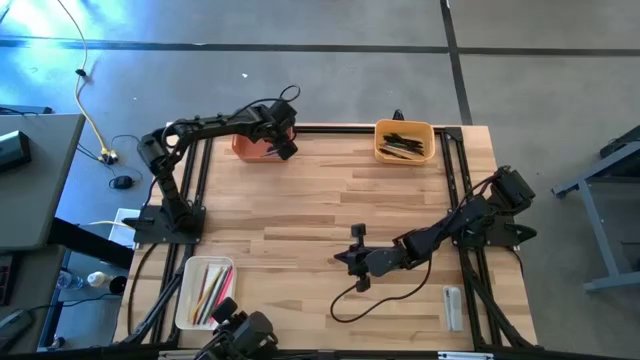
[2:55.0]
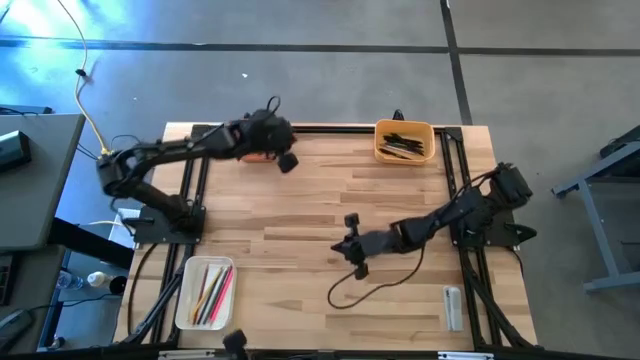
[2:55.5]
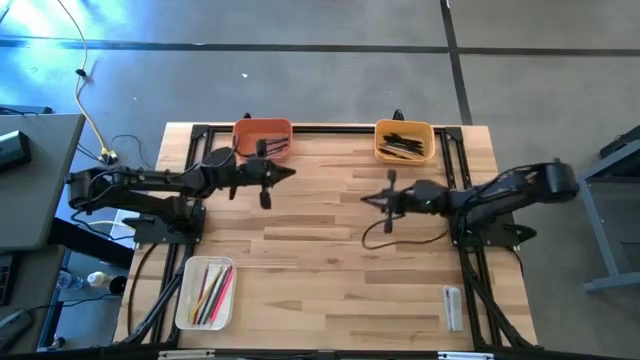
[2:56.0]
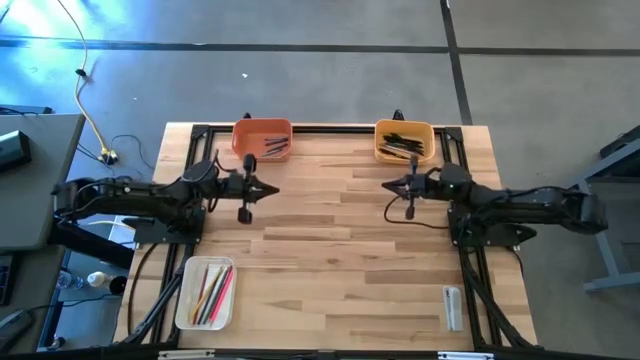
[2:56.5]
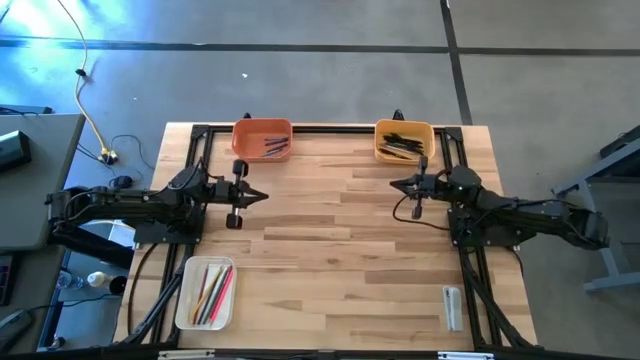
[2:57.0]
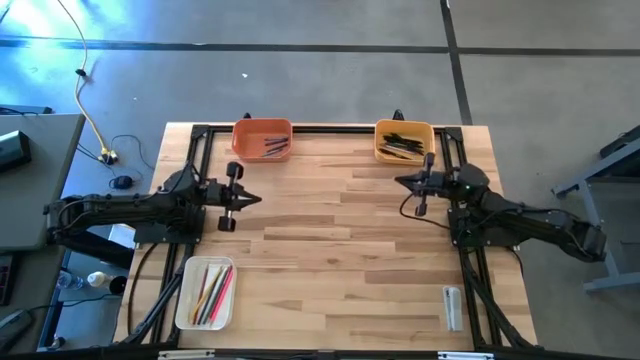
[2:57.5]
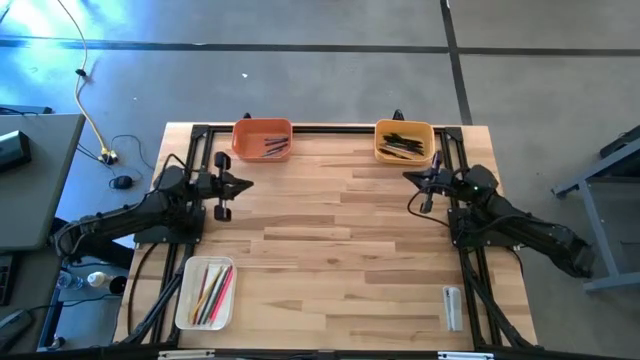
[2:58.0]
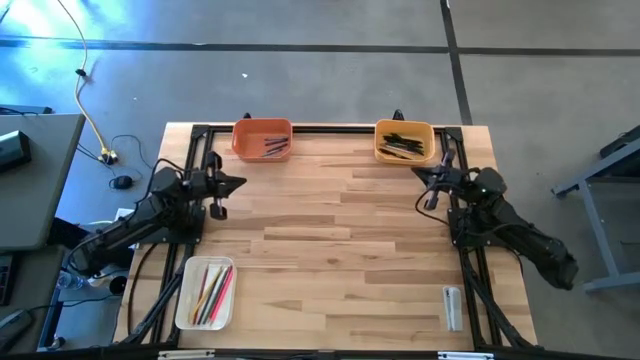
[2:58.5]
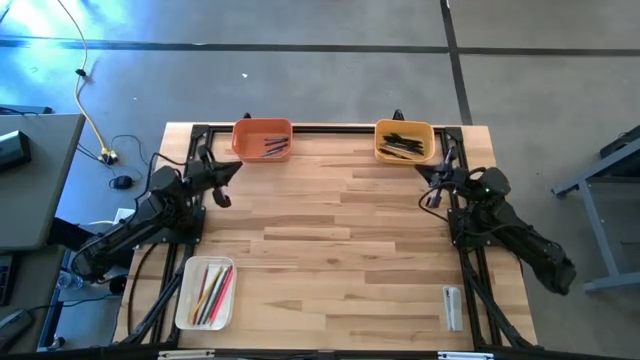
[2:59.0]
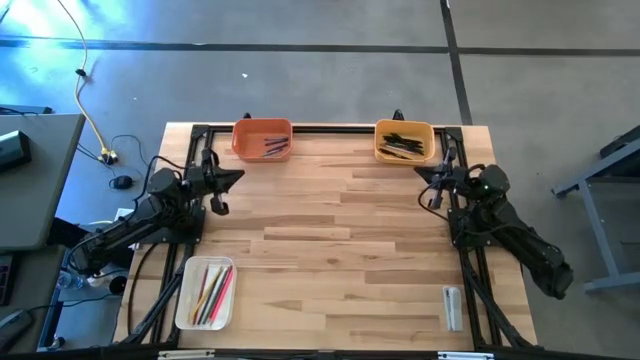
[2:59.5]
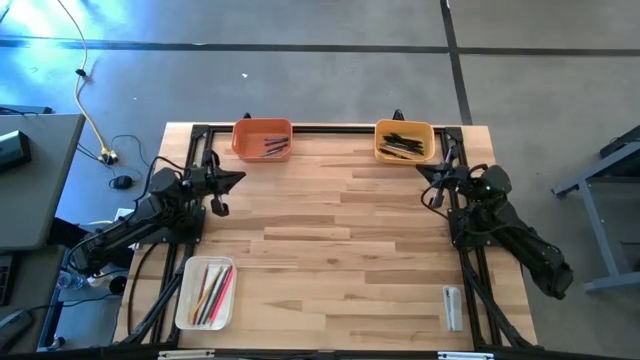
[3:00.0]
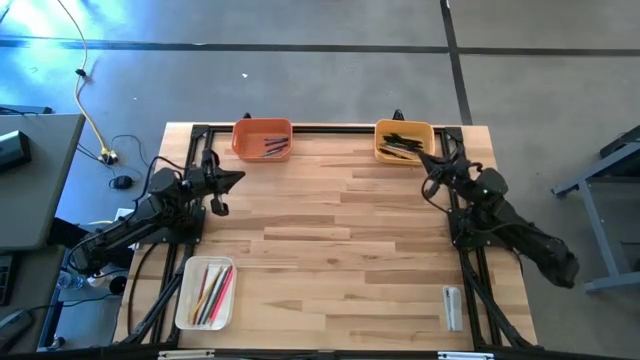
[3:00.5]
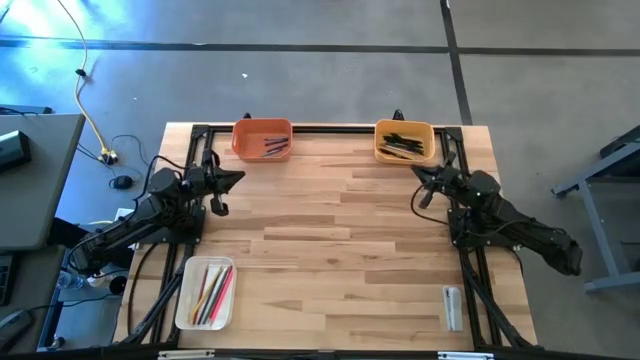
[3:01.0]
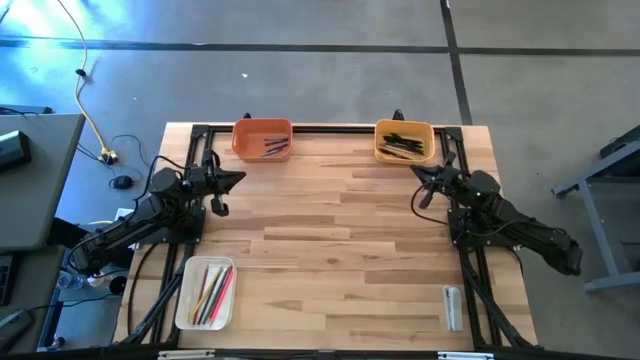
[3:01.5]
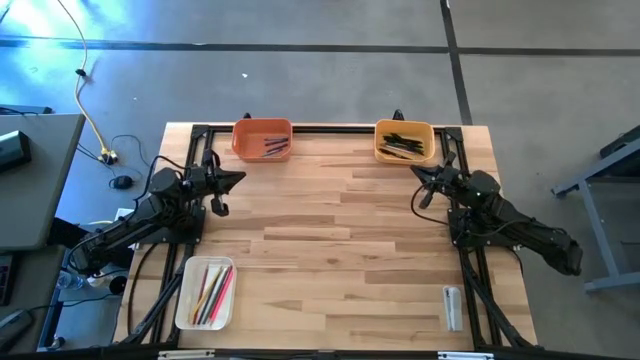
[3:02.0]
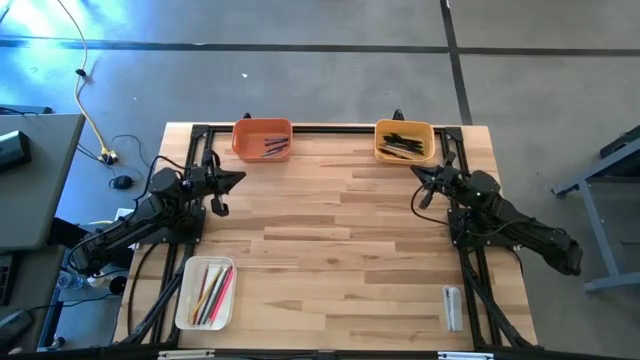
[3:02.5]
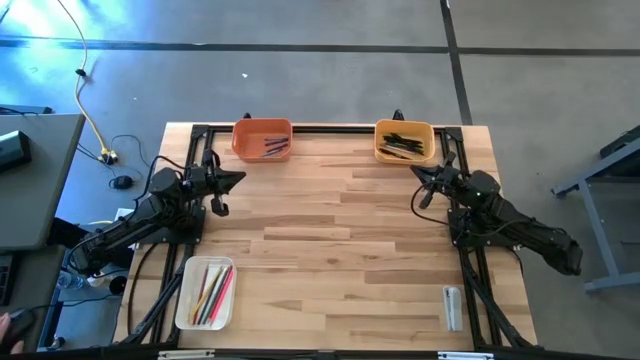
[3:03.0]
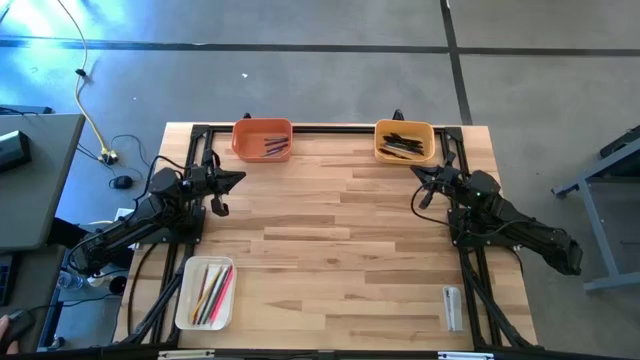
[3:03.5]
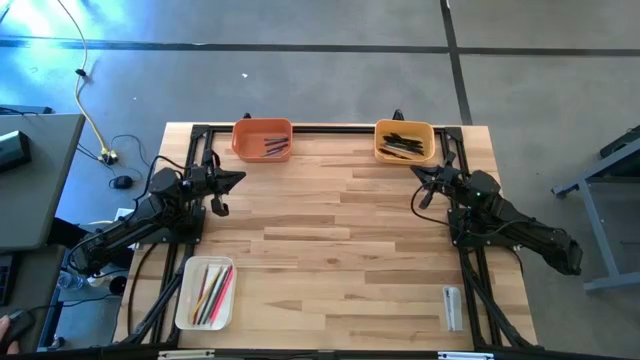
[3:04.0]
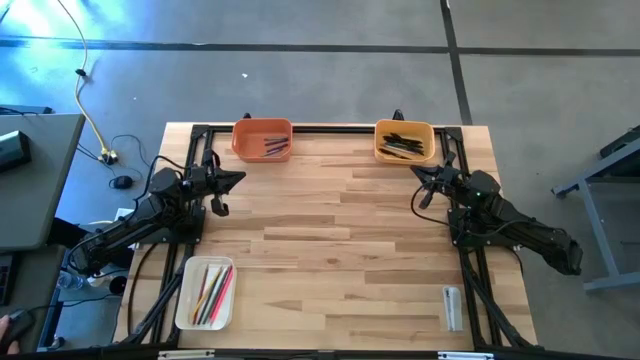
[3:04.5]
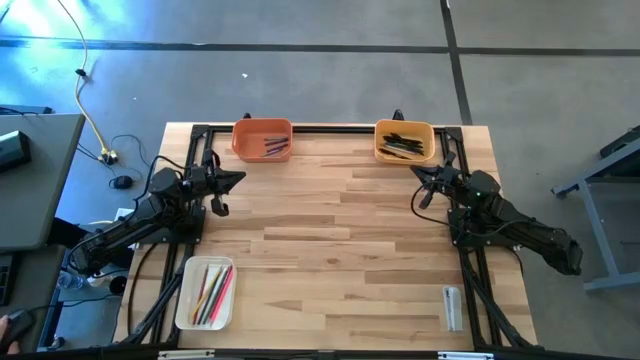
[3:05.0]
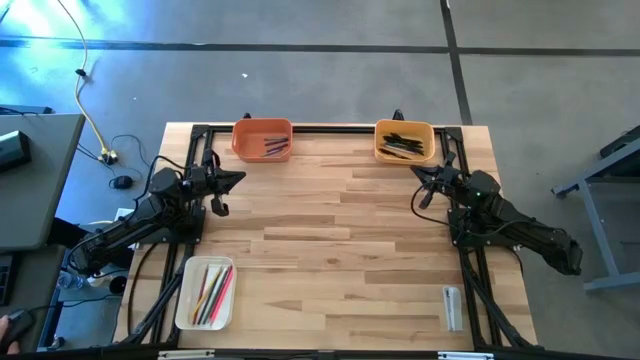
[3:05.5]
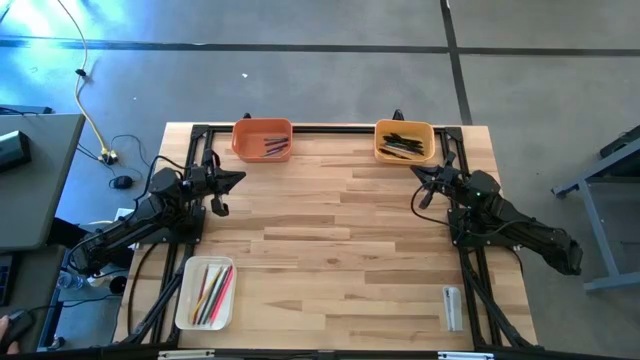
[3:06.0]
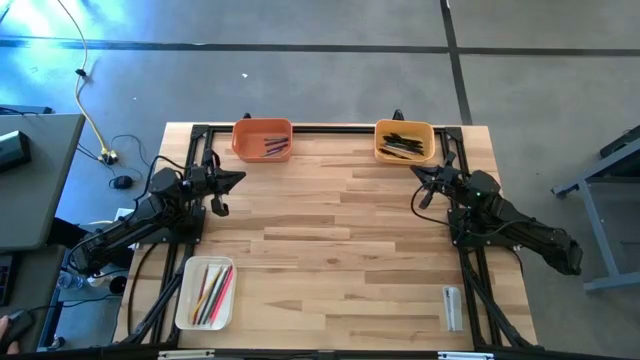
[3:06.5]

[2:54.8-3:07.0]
Task: Sort crayons/erasers/pens/pencils in bins
Return to Home Position

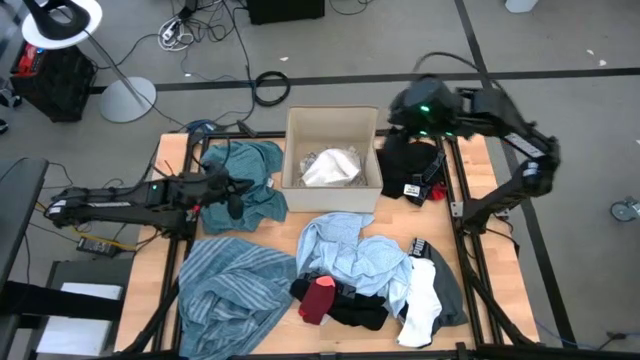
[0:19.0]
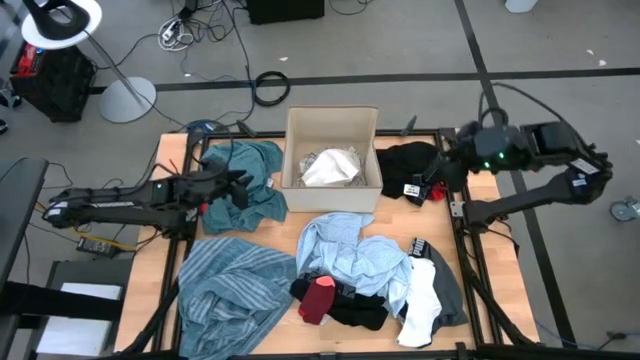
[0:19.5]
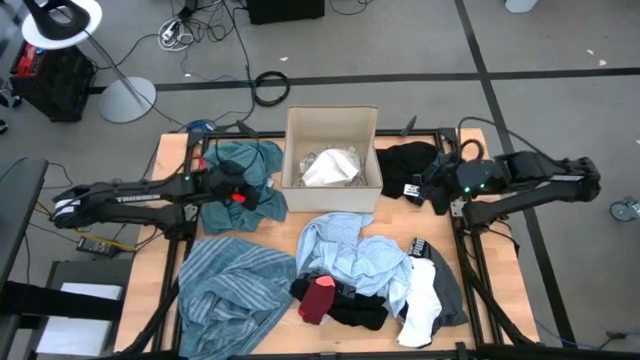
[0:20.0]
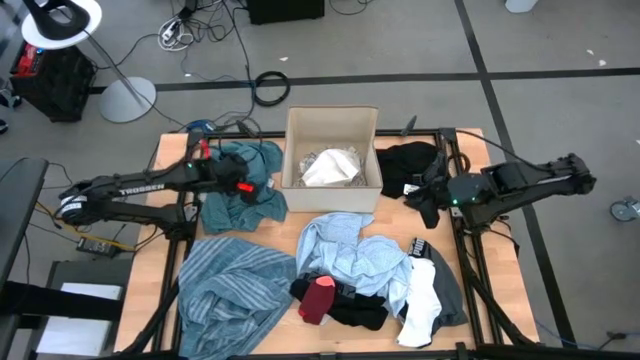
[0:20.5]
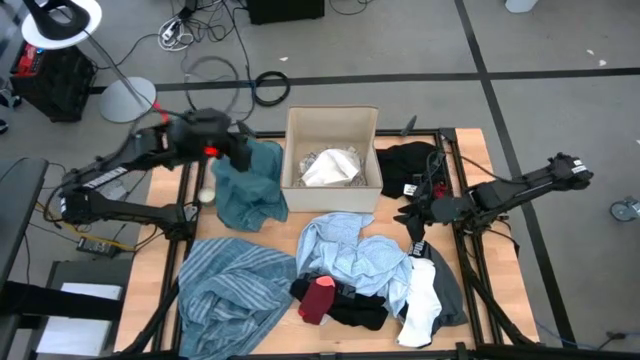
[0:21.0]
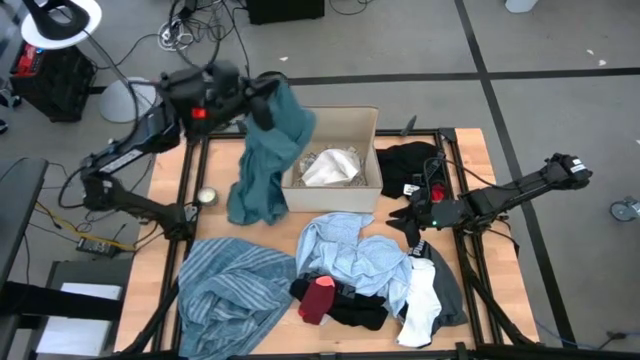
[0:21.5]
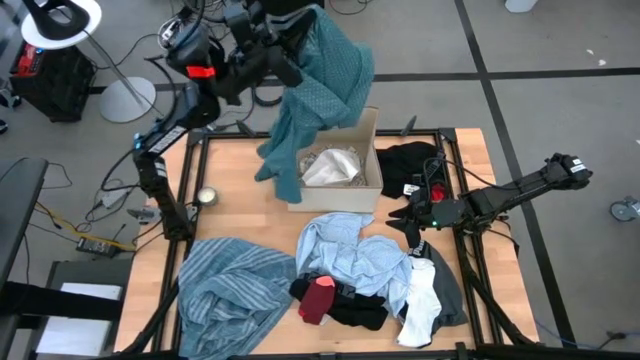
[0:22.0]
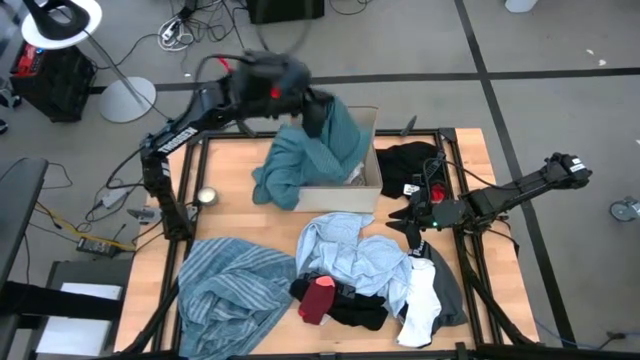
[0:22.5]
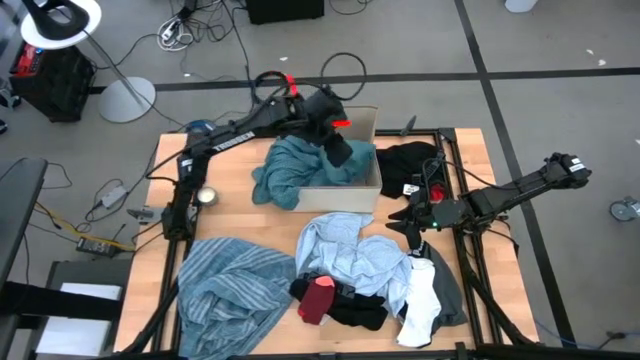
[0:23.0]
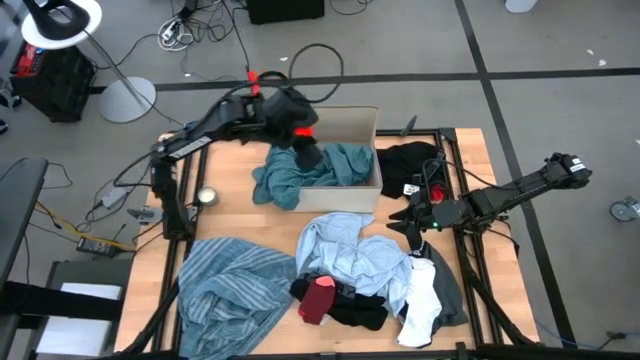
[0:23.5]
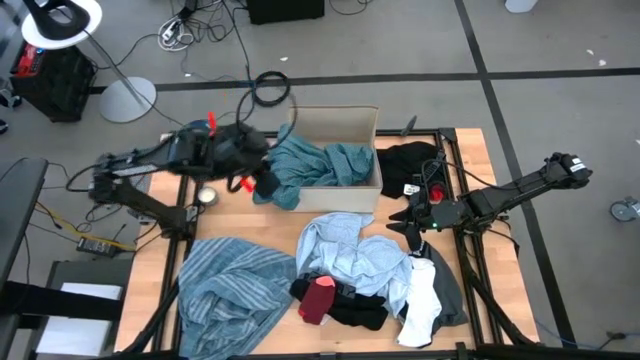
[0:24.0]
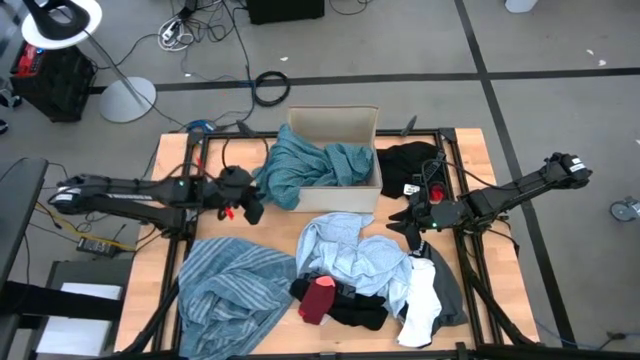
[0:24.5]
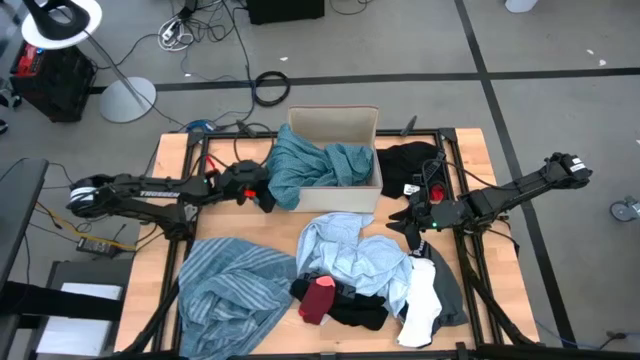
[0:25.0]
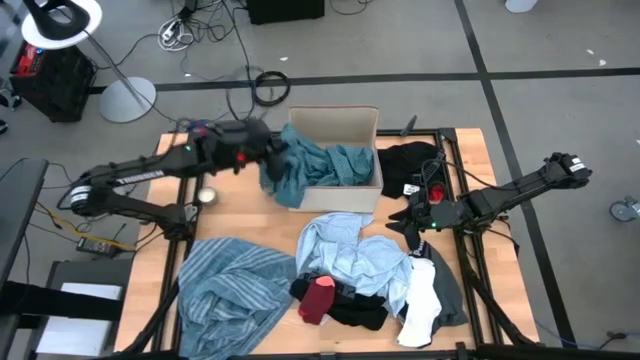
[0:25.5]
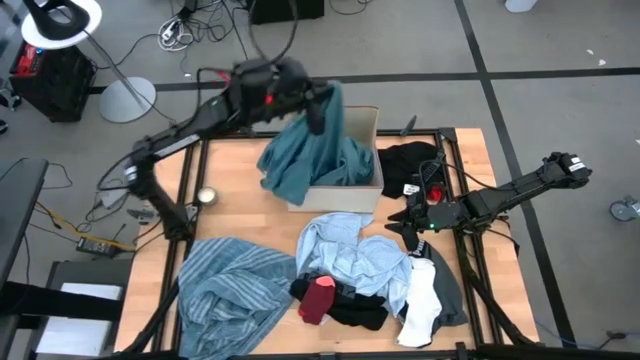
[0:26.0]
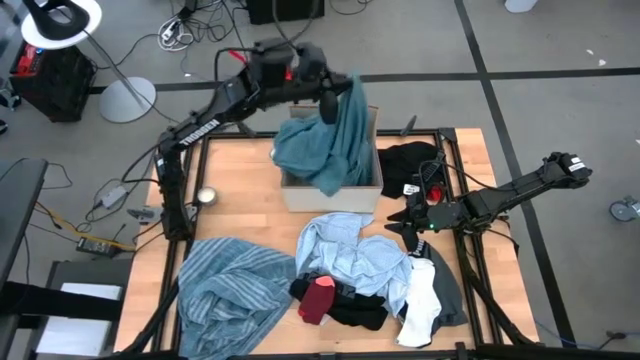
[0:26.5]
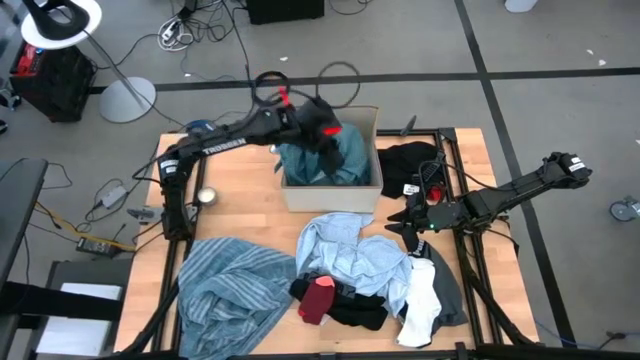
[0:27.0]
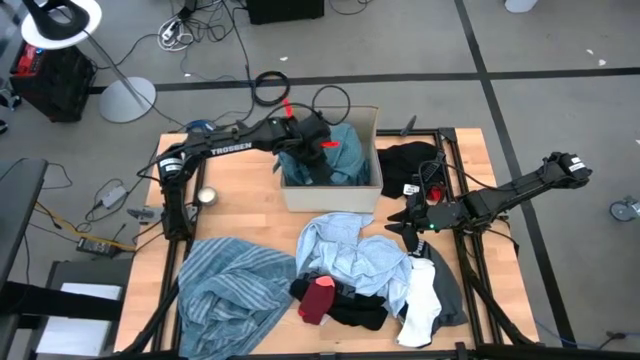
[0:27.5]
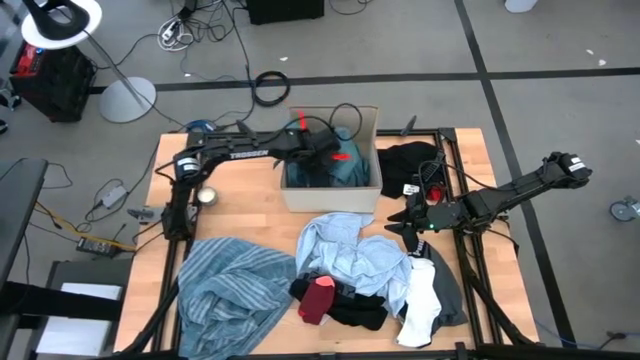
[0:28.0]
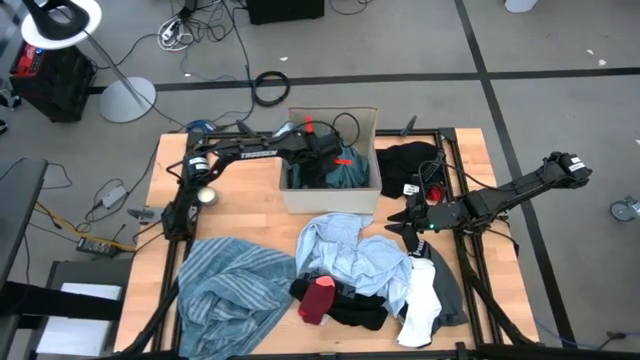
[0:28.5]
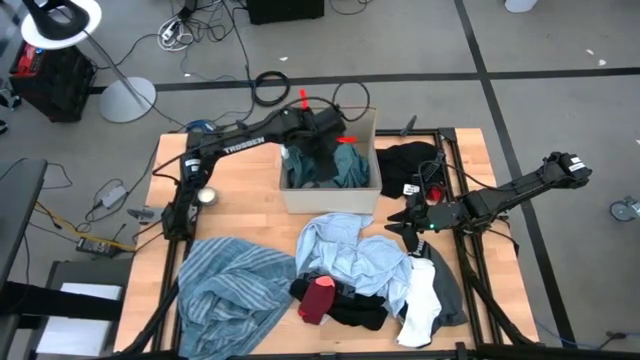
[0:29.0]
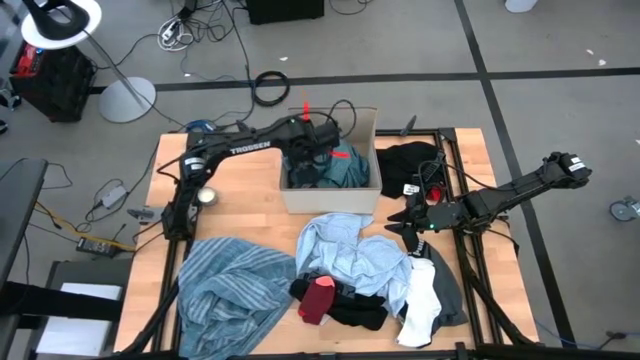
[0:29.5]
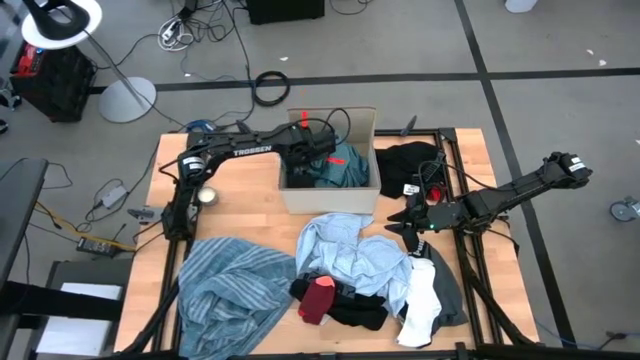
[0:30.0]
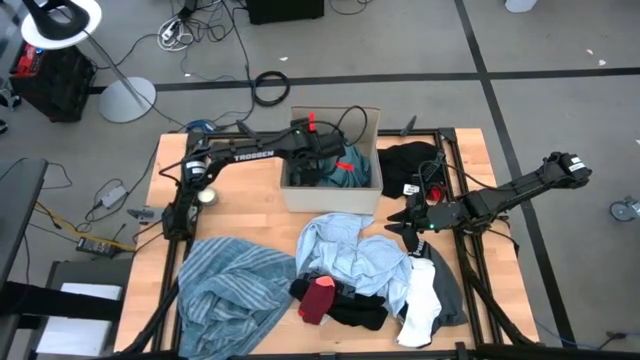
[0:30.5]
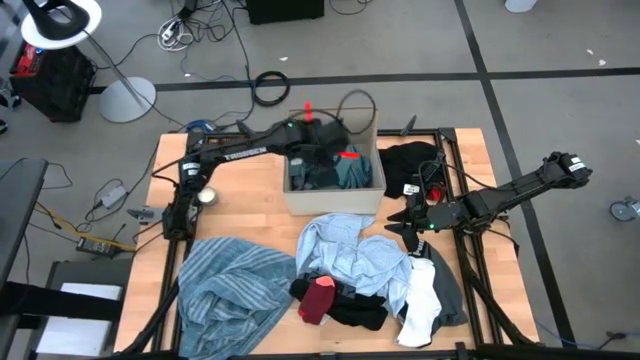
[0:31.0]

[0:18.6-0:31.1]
Task: Sort clothes
Put the blue polo into the white laundry bin
